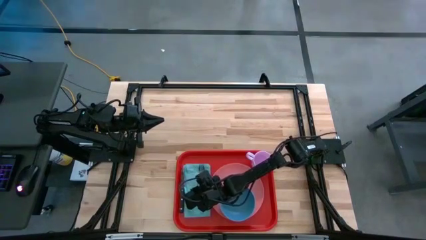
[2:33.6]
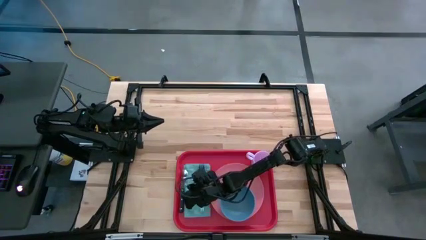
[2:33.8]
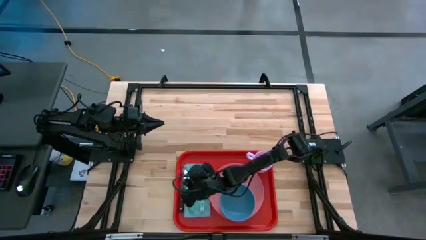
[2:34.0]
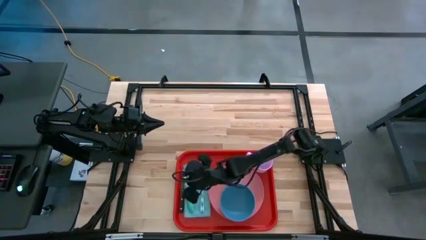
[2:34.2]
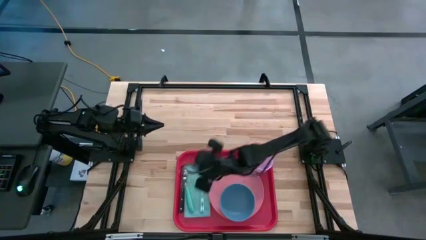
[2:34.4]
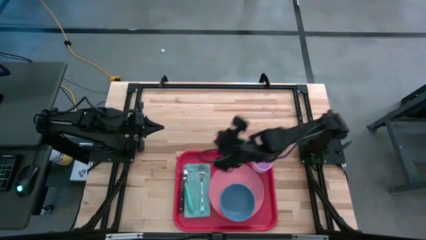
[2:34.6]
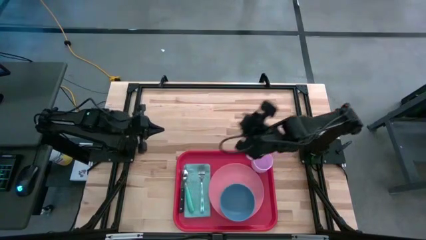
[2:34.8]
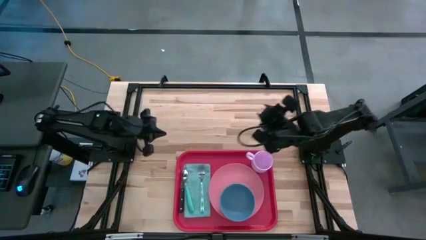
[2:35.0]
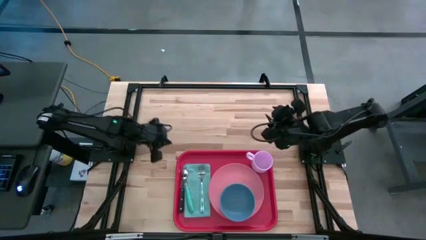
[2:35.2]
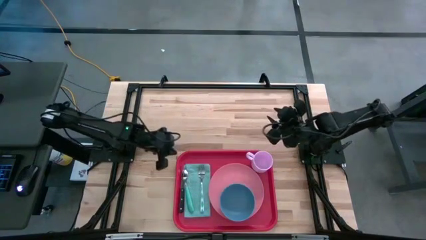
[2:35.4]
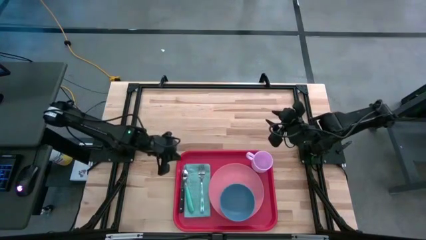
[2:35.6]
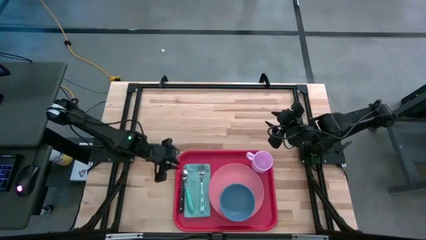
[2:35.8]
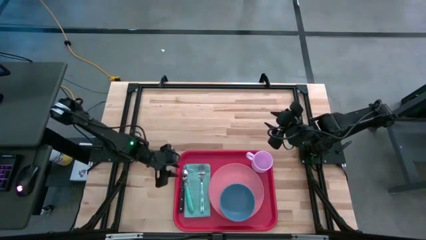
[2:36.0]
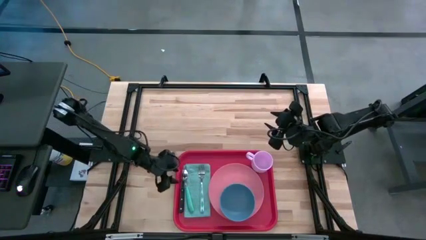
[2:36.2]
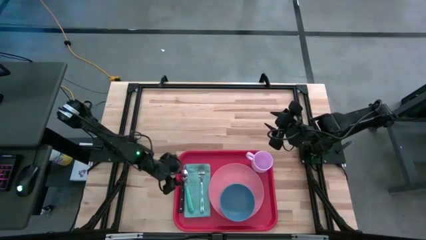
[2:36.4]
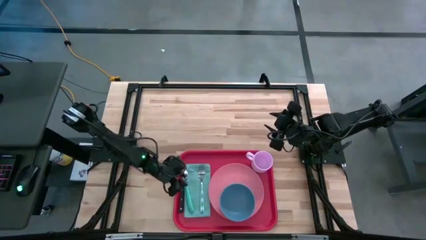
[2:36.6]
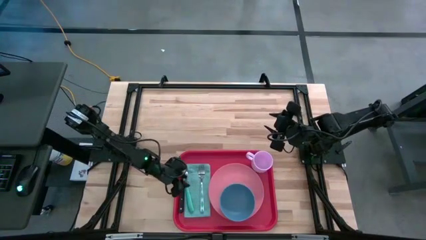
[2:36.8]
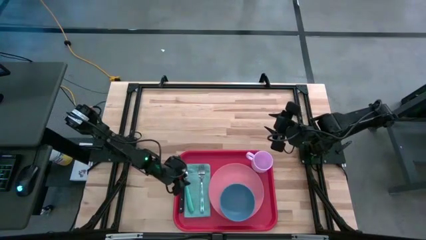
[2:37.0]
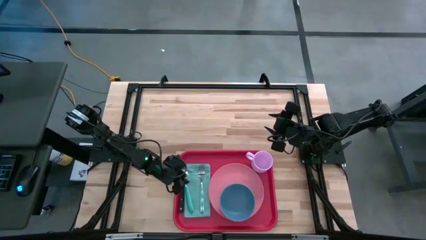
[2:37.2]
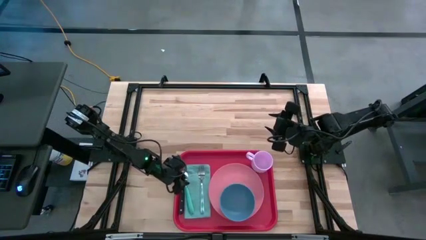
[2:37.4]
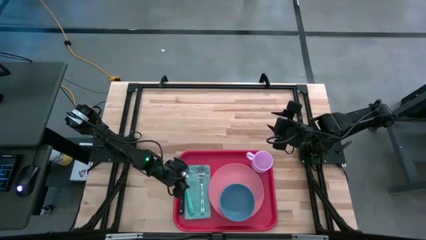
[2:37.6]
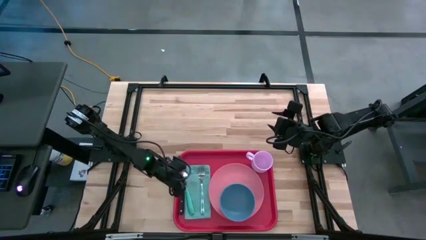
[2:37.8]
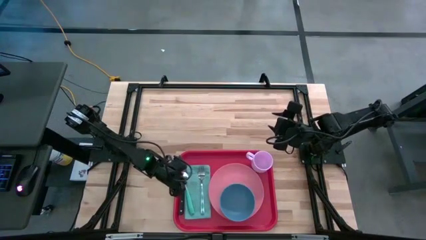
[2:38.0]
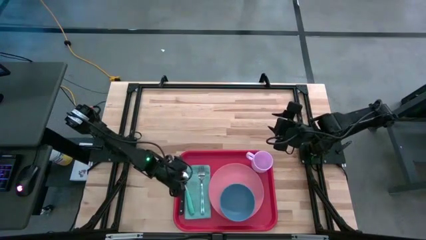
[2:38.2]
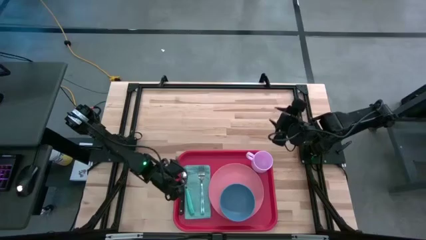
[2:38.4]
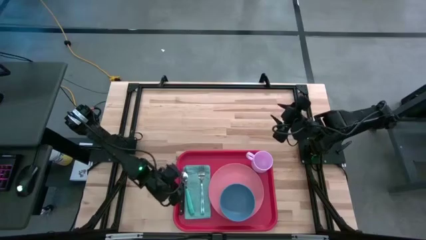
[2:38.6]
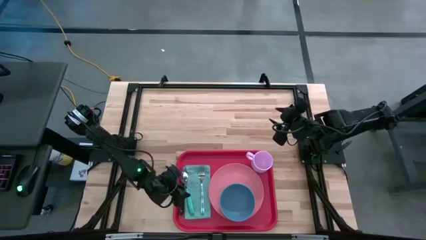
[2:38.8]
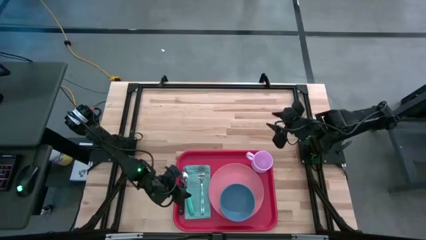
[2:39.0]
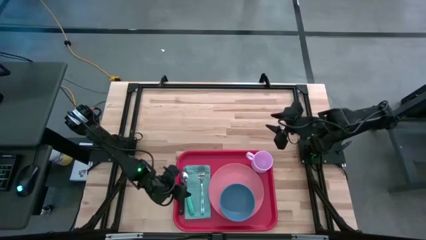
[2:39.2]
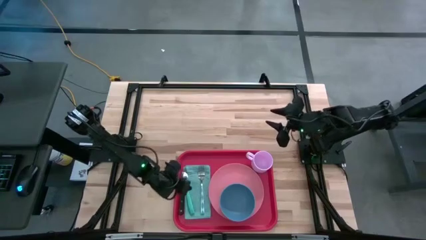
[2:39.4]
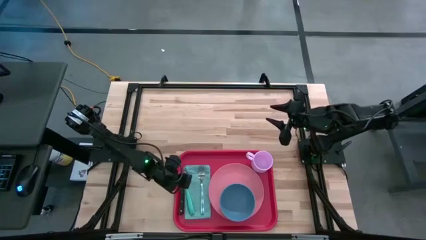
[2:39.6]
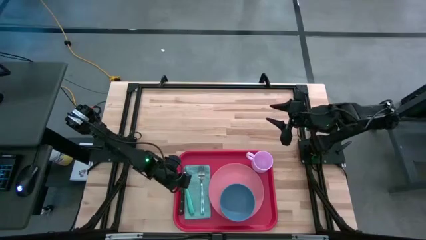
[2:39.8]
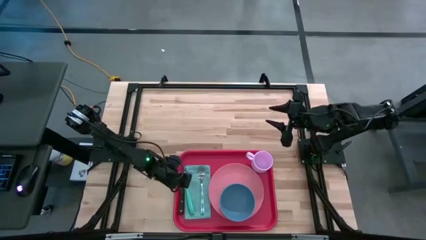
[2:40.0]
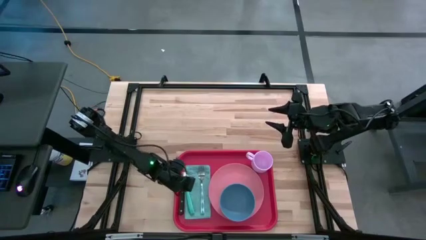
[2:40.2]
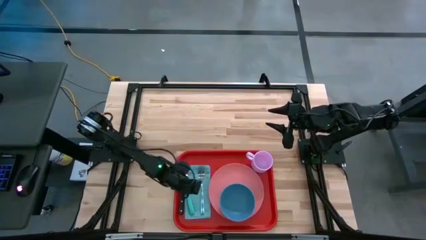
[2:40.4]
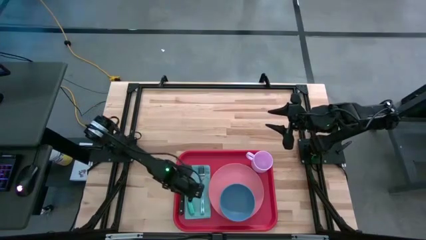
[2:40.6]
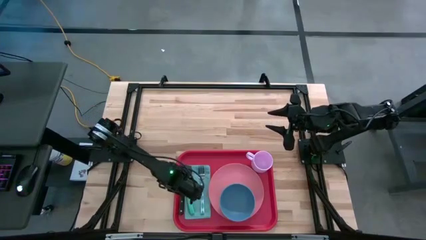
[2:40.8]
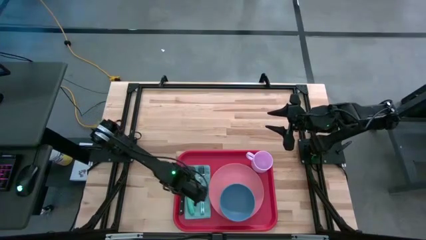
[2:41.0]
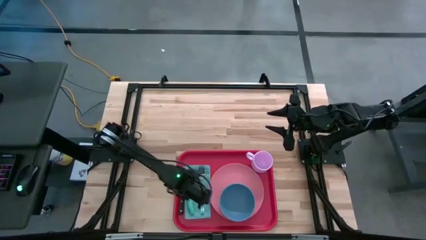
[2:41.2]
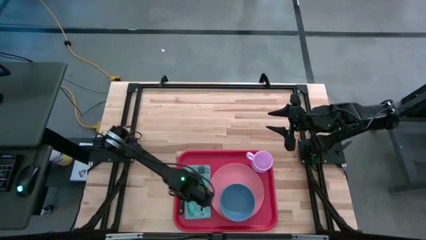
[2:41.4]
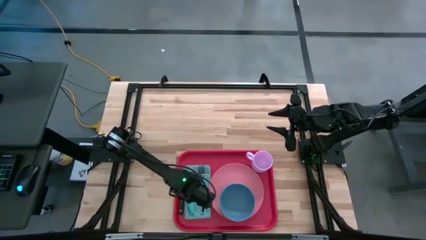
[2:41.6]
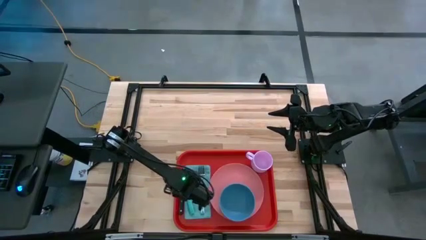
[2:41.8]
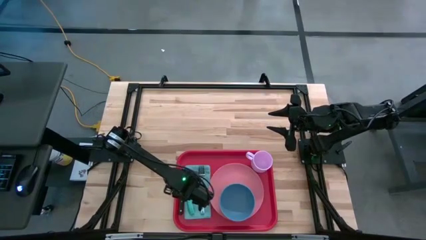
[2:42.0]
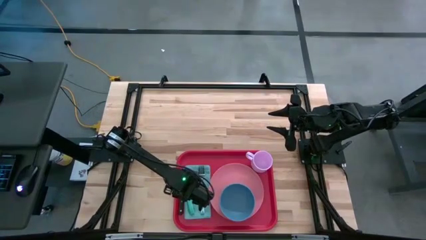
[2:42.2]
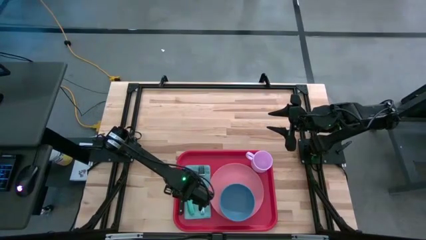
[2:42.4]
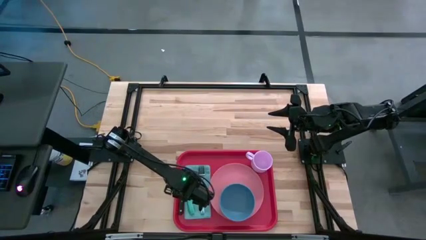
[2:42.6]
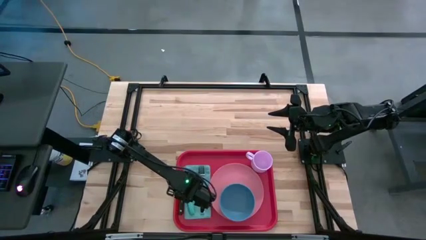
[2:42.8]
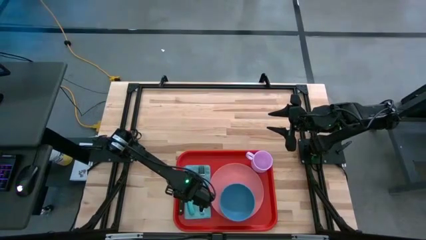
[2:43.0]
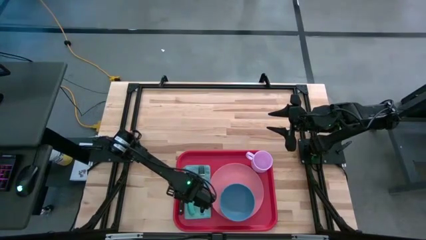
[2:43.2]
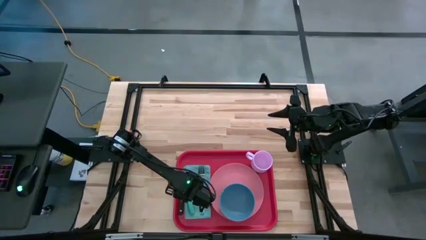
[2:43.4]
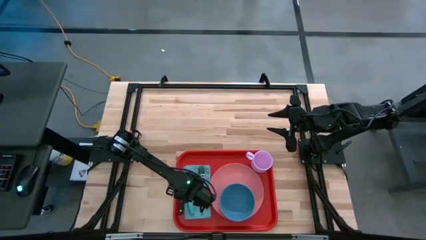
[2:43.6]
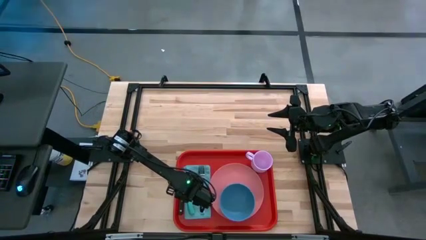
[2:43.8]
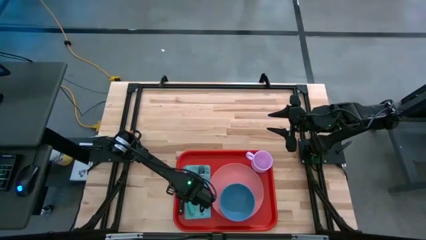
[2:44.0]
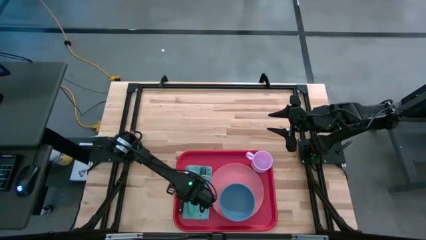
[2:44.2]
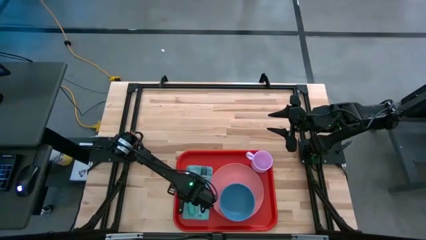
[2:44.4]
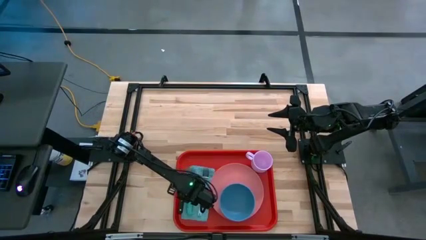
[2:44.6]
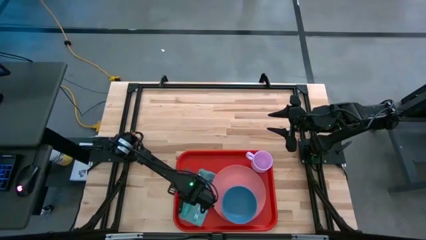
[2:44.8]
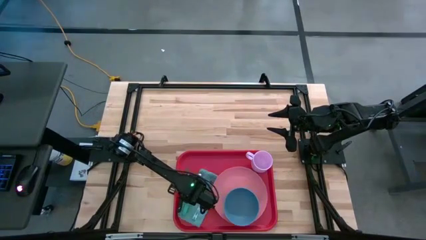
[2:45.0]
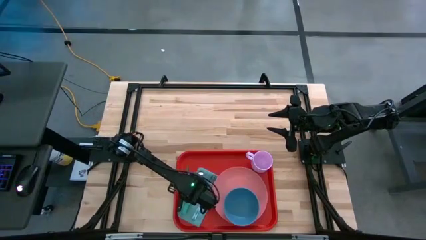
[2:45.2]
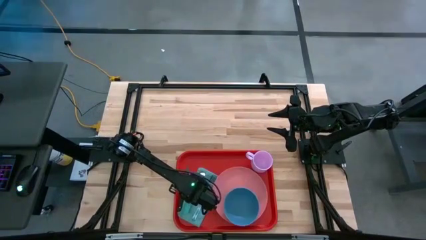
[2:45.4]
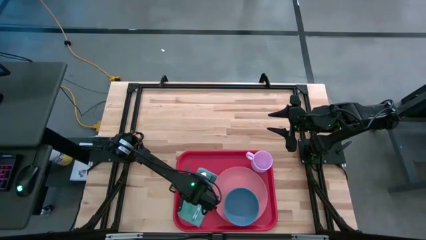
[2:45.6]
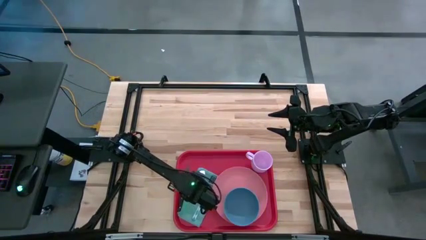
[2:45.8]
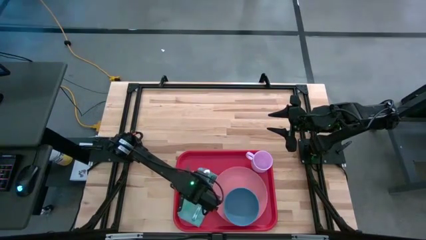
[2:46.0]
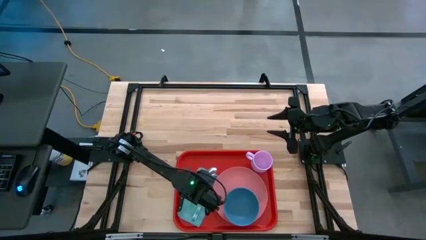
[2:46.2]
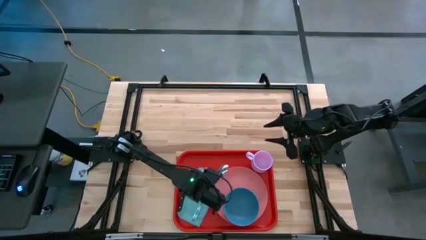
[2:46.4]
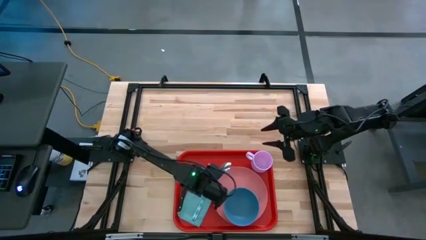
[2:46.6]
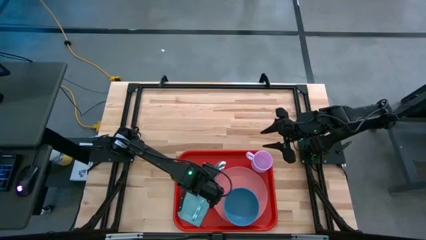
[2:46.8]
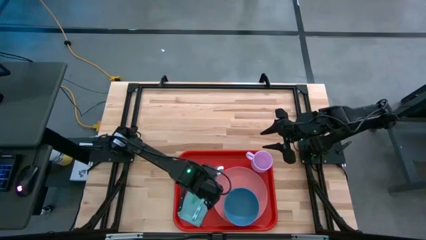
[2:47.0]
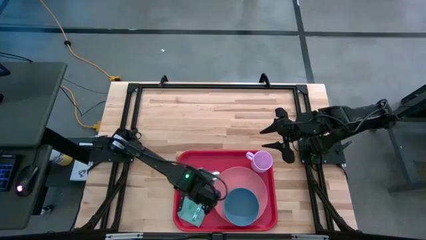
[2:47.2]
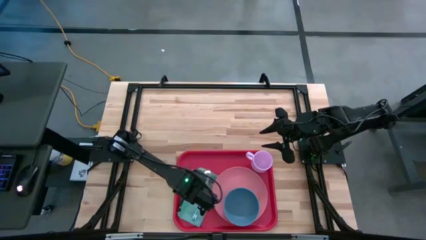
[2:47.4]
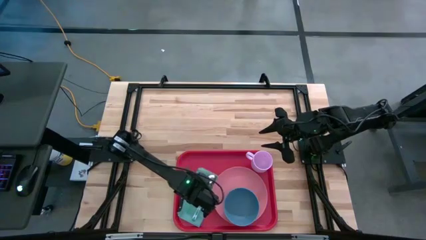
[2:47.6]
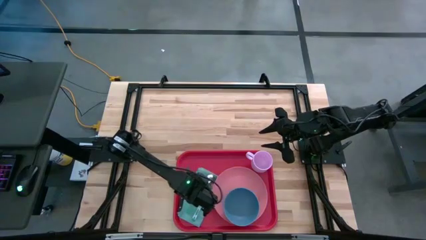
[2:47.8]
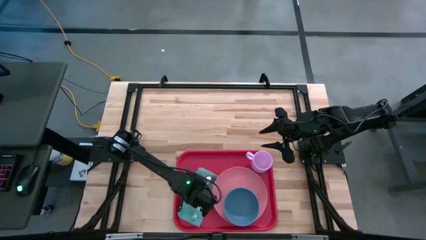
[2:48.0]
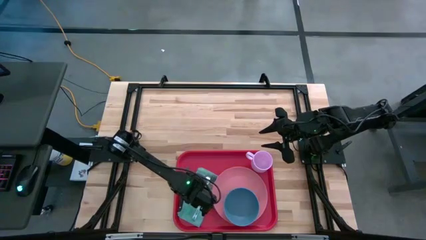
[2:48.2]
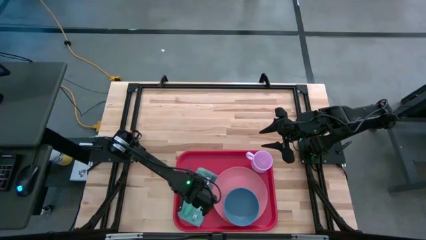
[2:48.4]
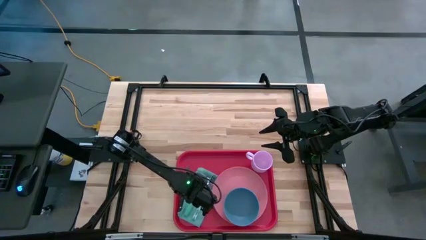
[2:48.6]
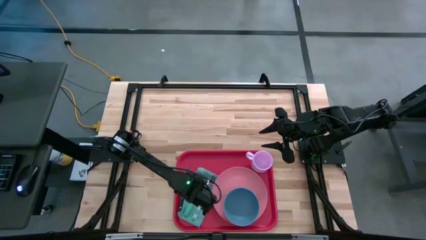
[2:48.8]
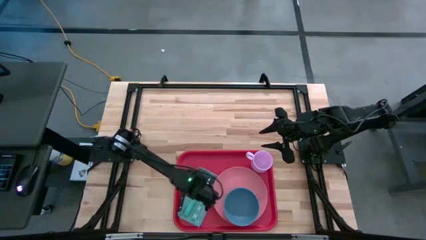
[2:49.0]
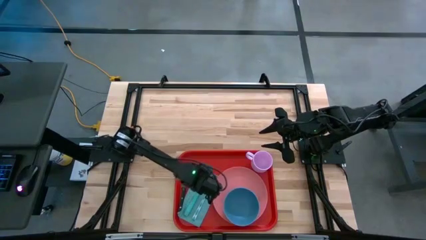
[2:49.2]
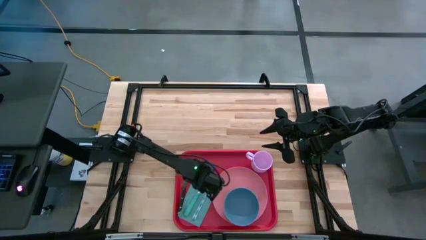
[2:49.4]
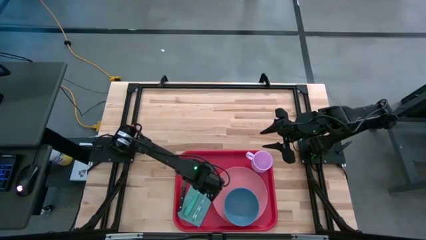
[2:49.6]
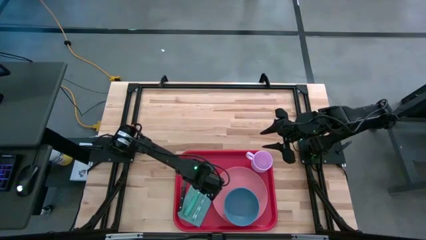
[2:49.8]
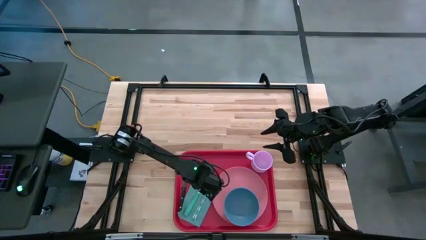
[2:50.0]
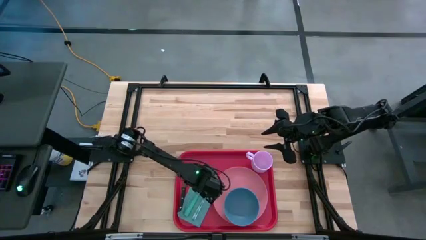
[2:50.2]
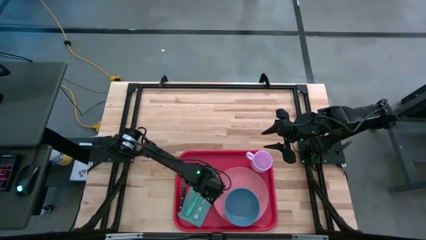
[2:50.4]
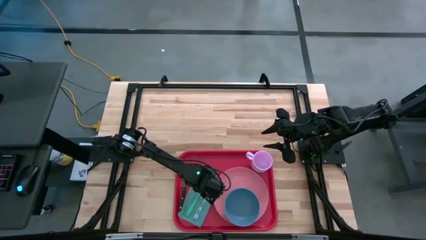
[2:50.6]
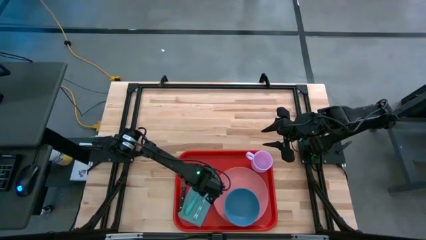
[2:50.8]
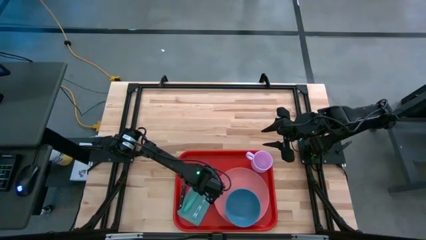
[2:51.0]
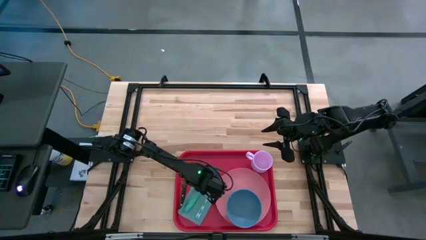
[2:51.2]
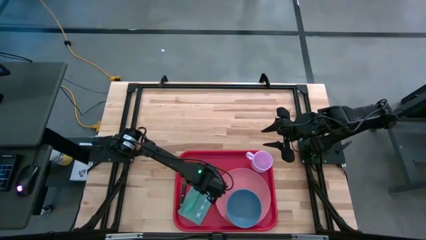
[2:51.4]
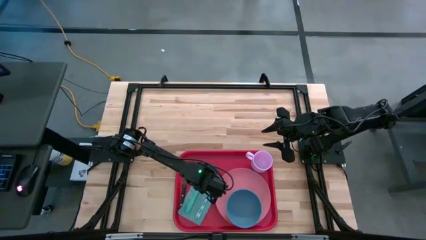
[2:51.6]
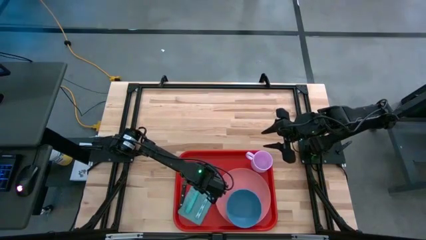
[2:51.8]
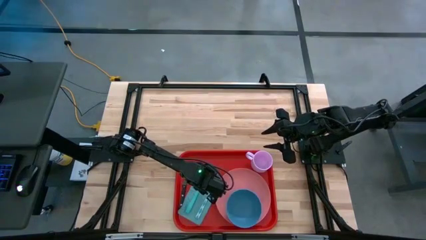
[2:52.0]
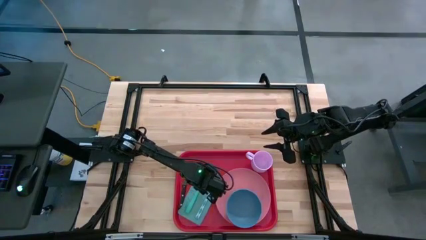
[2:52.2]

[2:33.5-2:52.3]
Task: Set up tray
Adjust the blue spoon on the blue napkin
